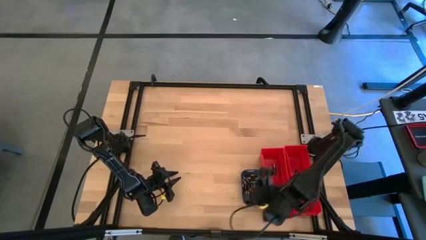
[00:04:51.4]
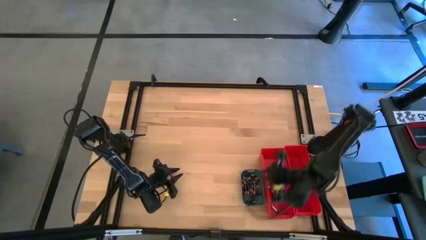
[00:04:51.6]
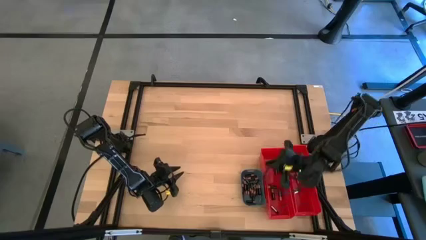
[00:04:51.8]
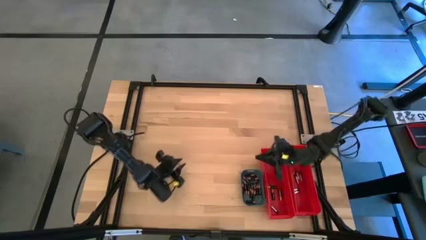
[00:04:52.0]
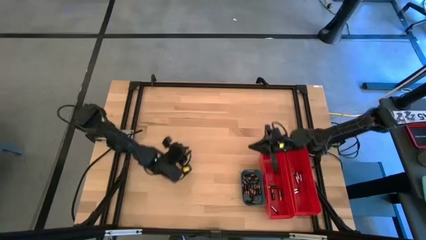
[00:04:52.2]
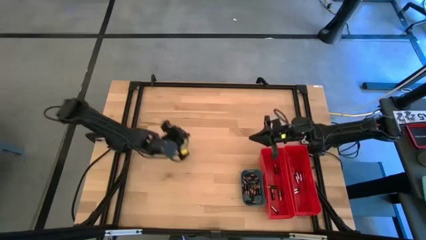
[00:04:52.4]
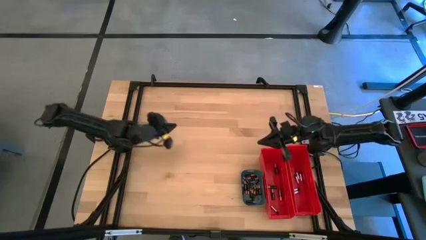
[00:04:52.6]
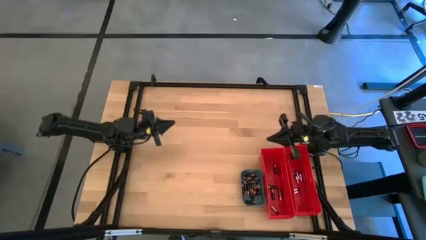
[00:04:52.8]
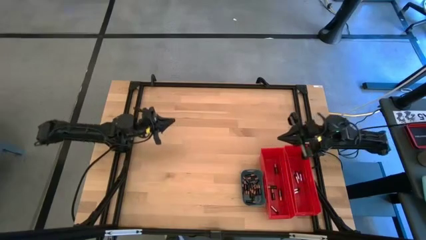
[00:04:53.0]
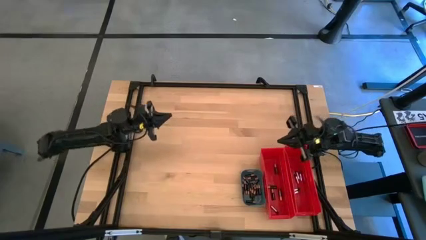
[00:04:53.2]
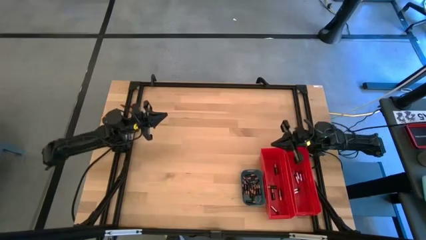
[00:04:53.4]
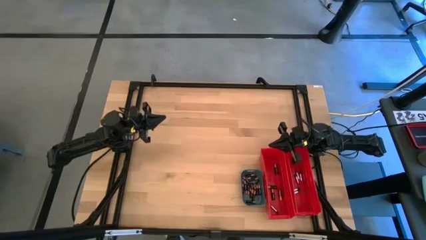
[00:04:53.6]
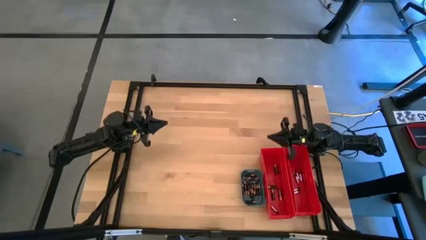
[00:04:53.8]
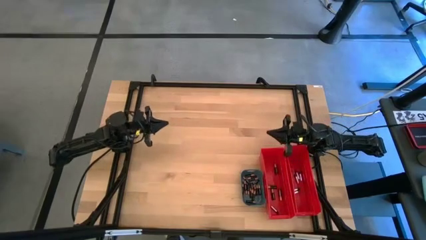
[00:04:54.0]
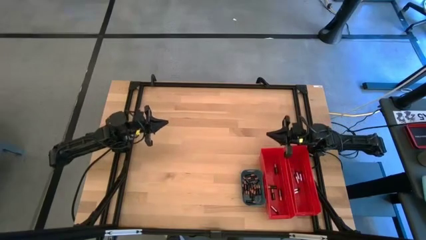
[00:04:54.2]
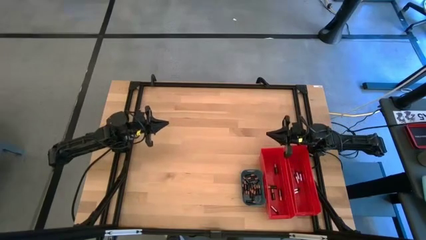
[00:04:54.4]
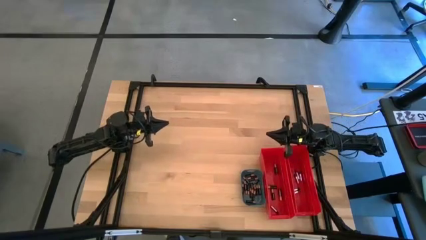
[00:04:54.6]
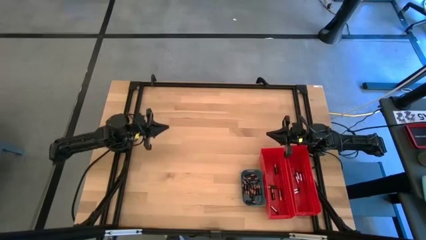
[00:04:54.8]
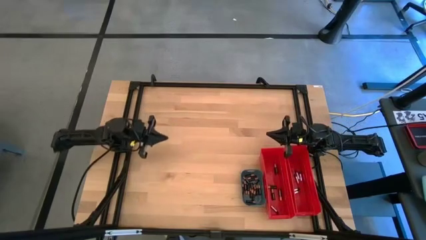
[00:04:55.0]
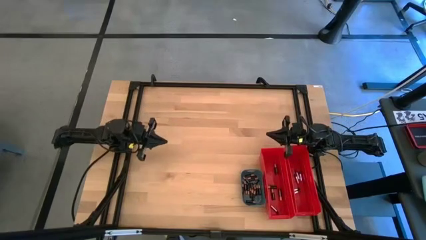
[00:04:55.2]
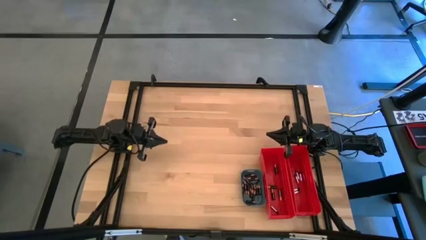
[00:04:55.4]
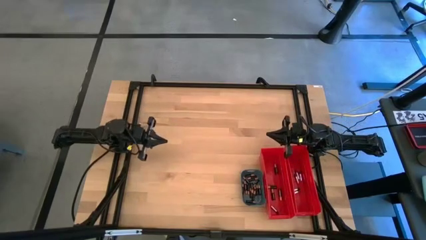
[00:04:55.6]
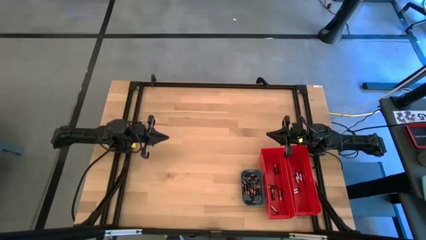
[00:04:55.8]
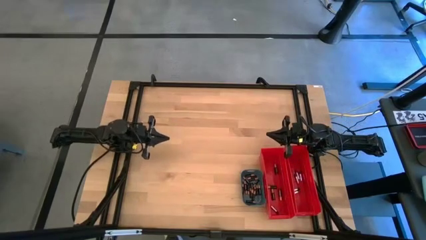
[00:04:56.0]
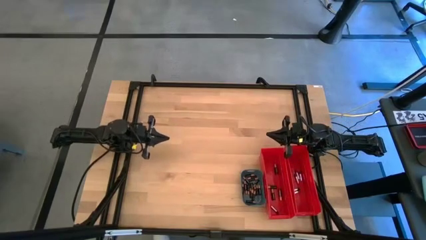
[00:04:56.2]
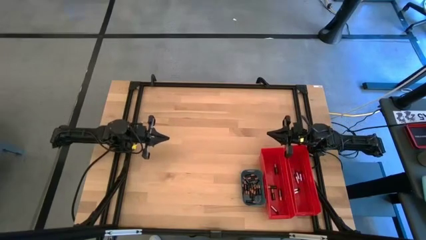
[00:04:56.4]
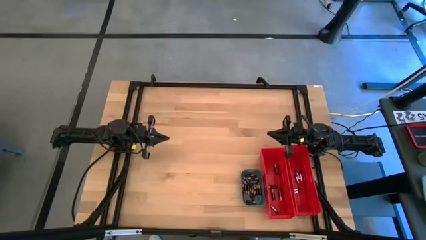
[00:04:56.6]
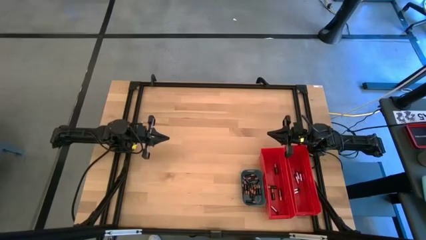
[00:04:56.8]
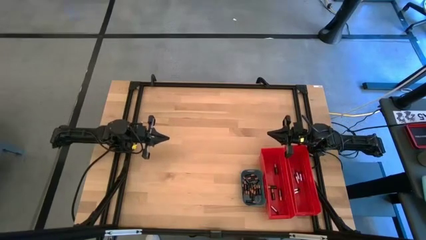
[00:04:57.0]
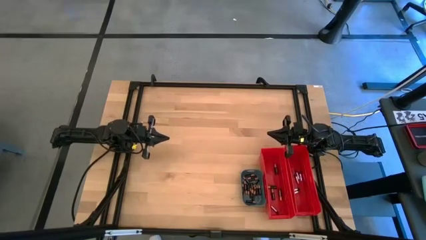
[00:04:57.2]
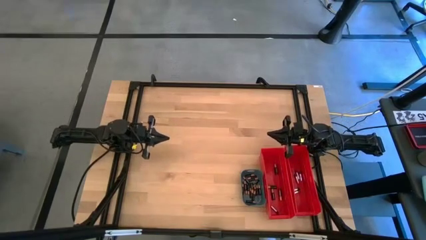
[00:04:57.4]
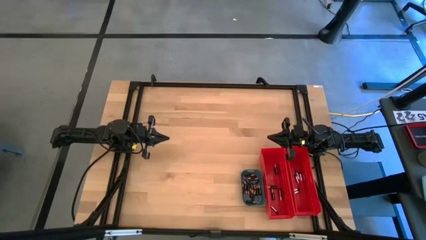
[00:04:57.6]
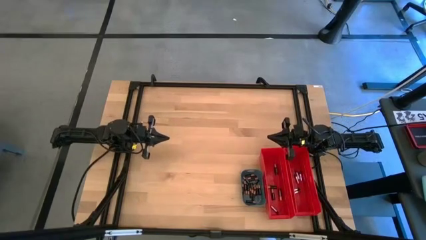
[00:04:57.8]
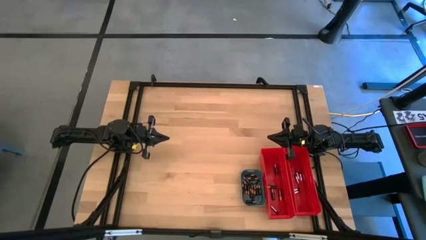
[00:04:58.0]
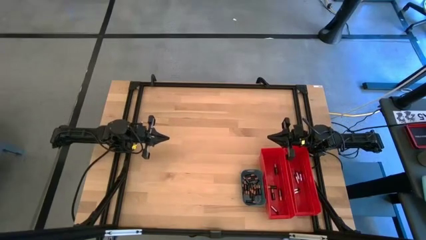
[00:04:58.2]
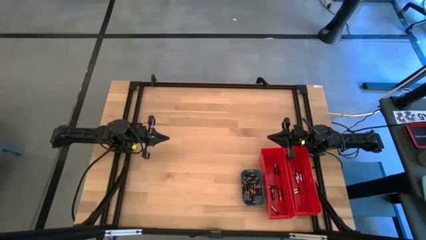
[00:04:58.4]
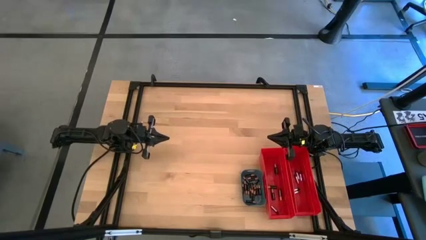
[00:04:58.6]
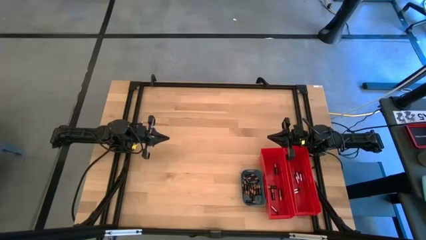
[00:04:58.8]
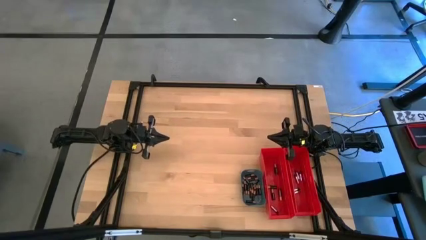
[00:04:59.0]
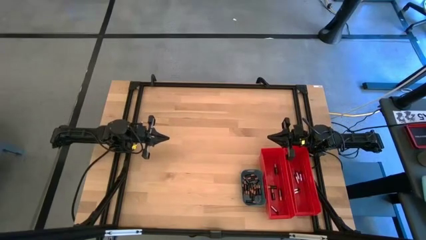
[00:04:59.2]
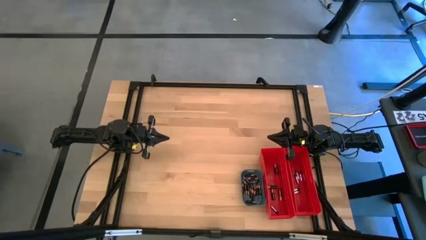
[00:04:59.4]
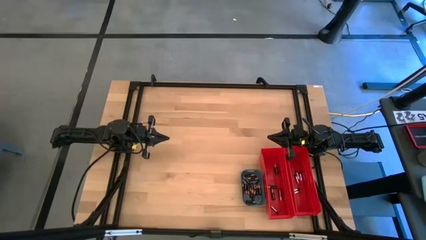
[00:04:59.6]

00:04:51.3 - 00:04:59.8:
Task: Sort batteries
Return to Home Position

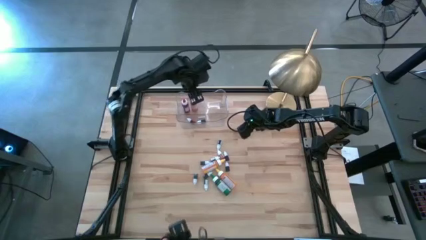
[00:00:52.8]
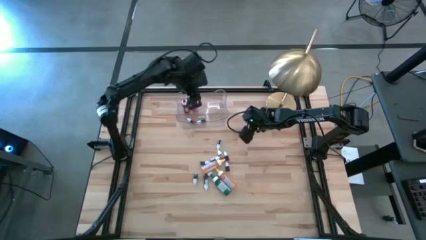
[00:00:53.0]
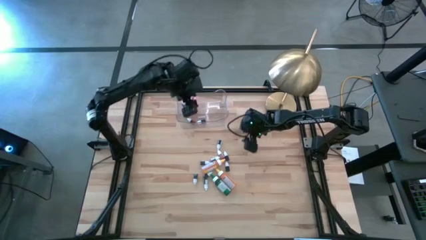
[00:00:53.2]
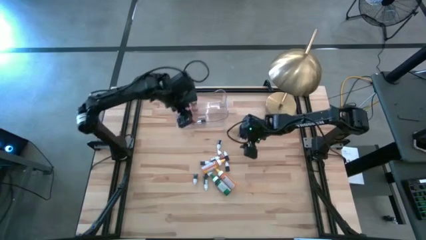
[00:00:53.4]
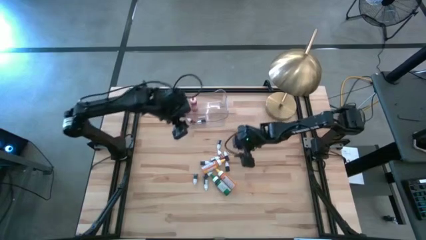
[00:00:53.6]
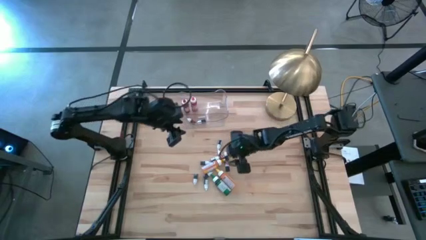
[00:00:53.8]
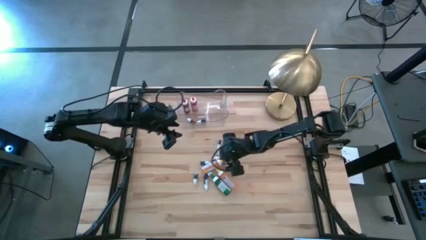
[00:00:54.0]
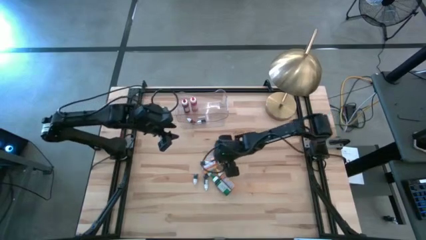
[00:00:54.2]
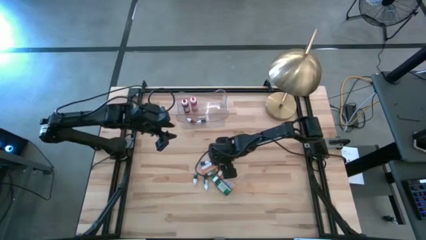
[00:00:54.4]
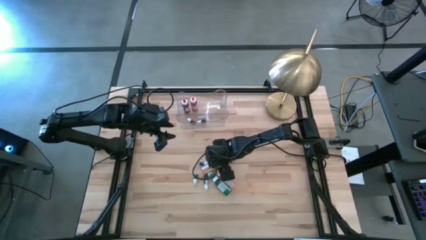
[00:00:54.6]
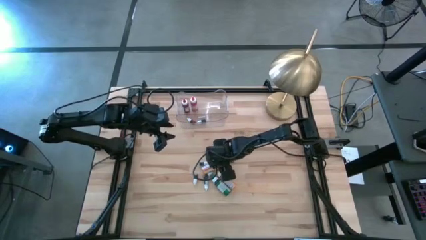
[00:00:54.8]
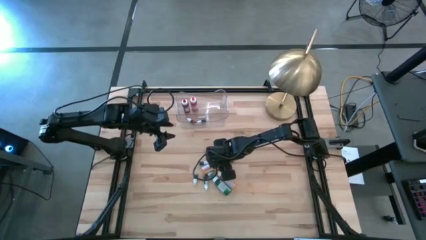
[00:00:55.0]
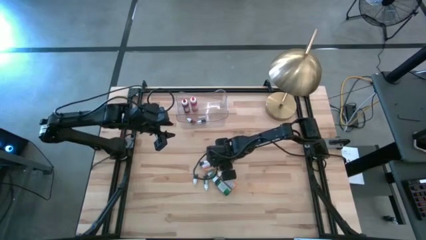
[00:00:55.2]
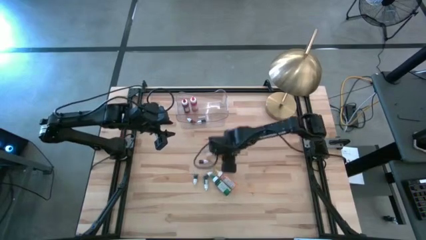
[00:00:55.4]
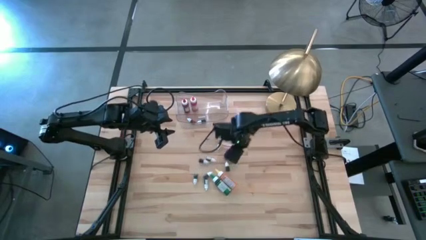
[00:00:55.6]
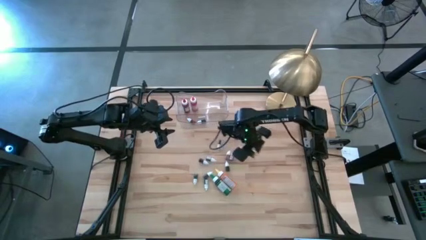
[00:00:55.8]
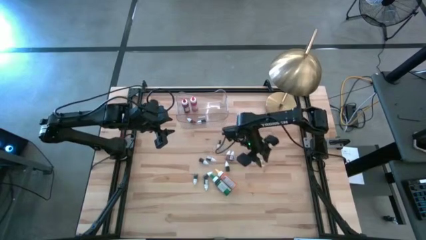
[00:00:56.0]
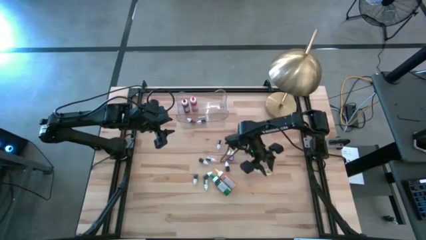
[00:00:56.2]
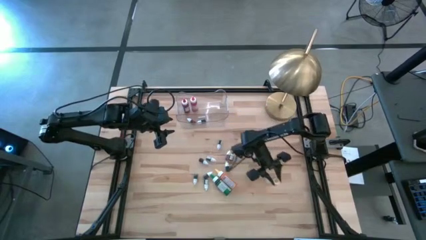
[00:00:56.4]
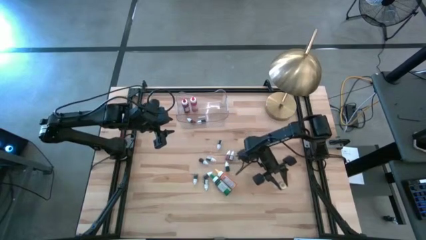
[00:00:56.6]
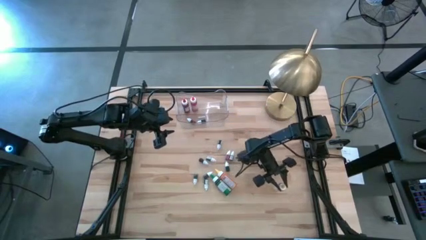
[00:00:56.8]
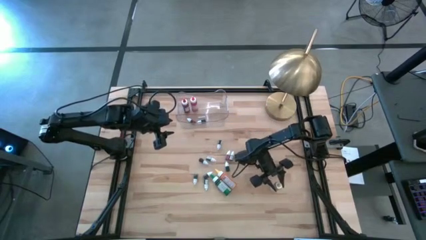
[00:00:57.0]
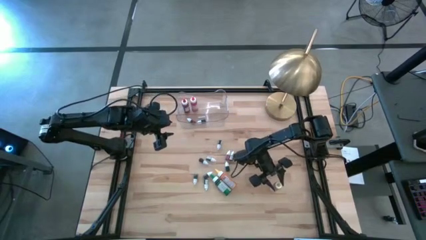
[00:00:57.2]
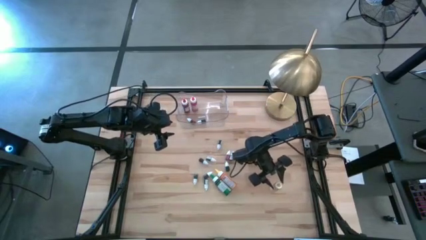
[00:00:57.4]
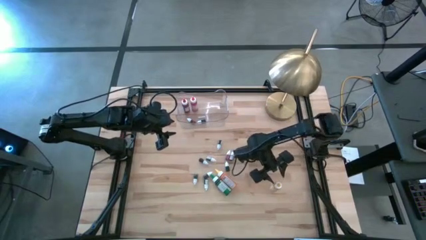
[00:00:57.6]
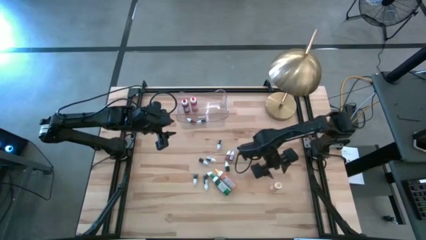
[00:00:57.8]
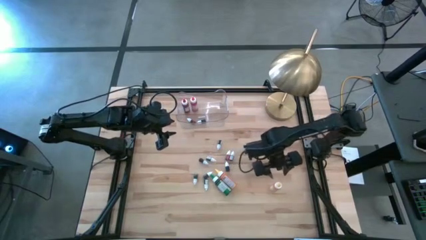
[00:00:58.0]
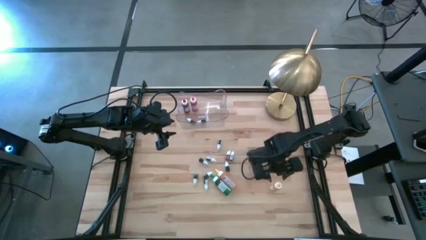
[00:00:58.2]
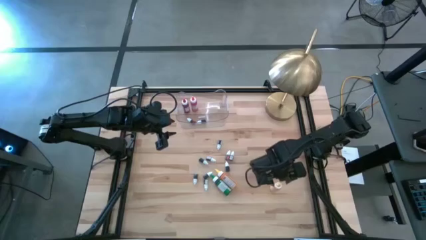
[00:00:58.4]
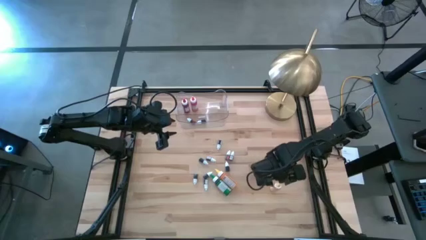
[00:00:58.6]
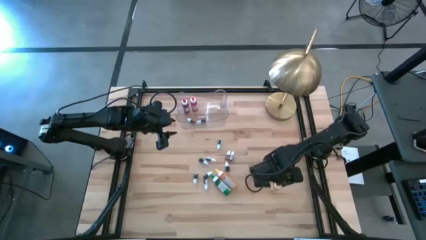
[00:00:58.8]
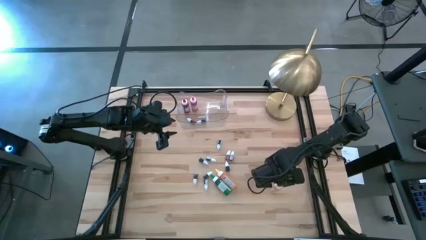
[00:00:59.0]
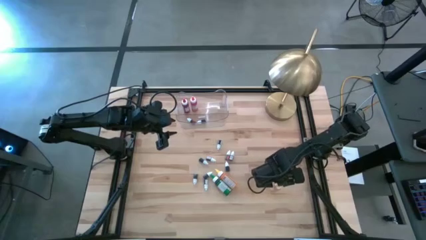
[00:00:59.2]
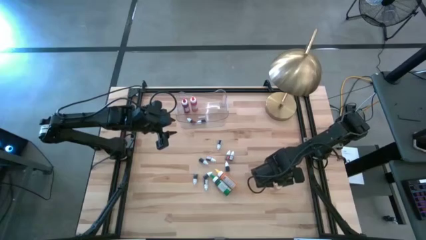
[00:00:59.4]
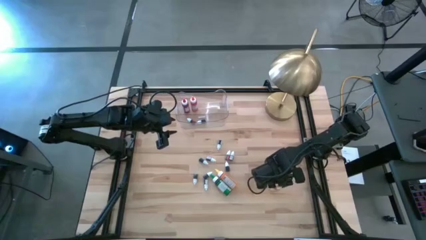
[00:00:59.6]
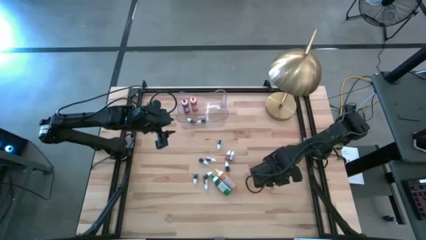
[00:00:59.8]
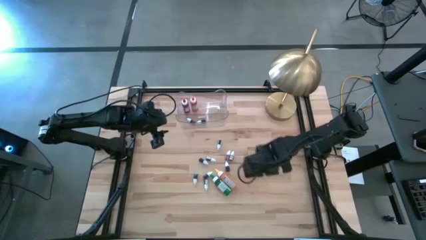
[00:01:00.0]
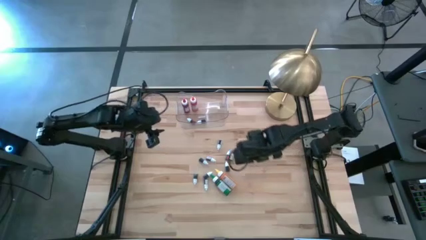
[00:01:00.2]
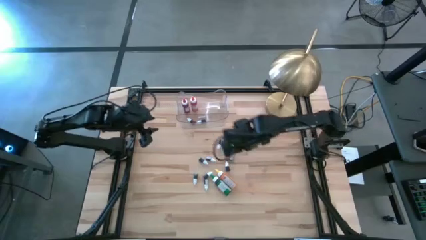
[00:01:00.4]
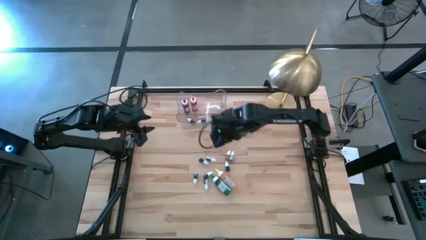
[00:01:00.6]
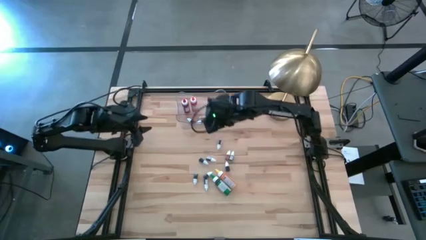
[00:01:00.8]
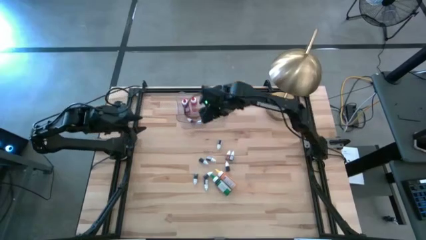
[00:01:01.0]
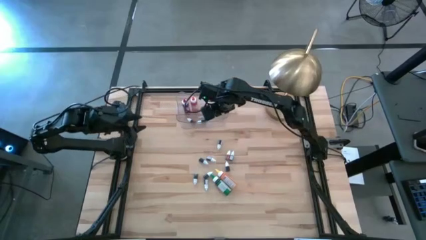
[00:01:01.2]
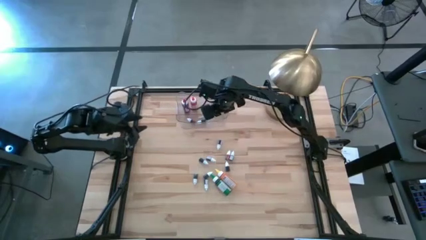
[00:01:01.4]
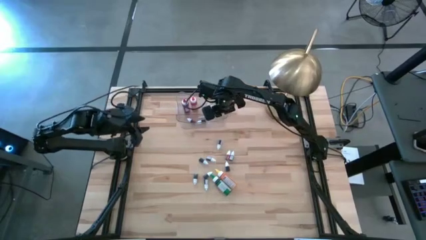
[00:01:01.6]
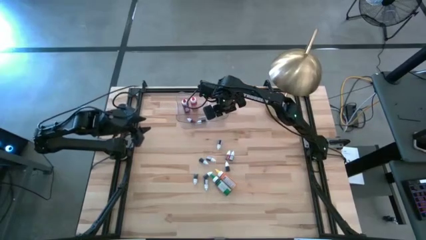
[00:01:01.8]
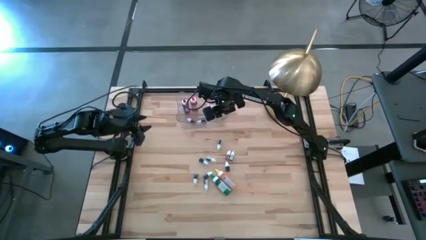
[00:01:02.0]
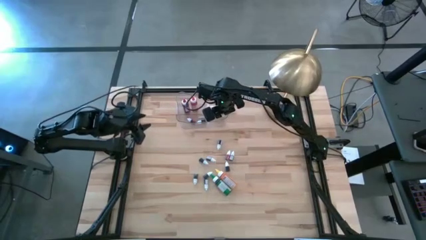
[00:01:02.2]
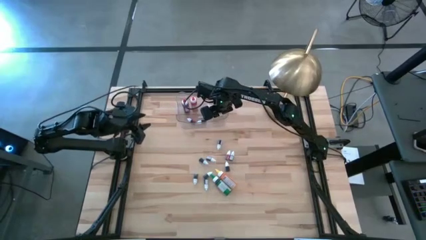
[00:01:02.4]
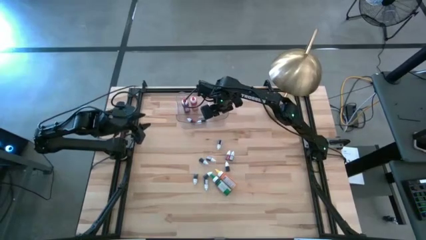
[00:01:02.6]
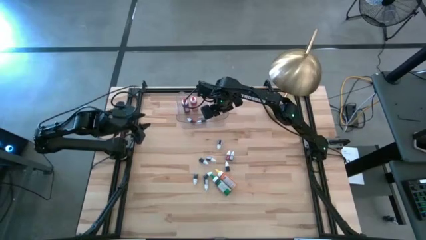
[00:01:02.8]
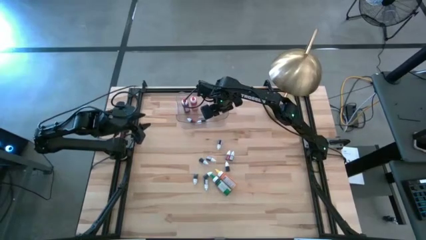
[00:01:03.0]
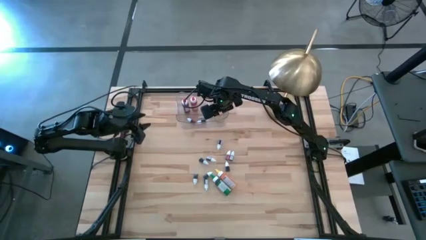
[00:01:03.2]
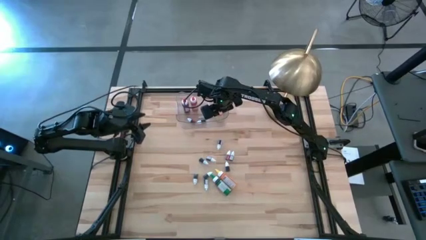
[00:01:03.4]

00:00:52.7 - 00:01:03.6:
Task: Pick & Place food coloring
Put the large yellow food coloring bottle into the transparent bin
